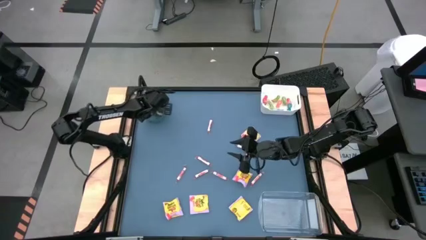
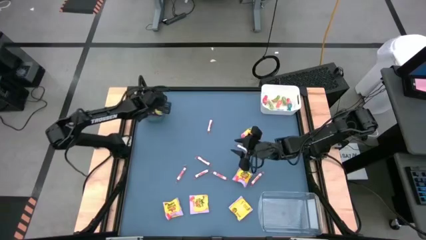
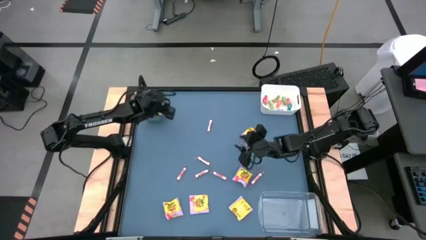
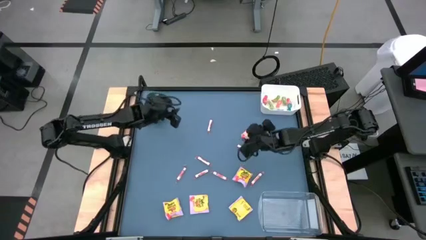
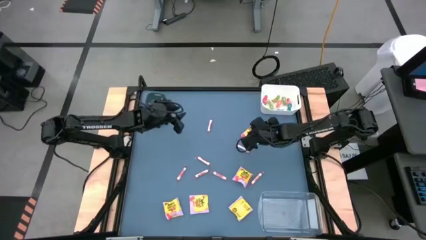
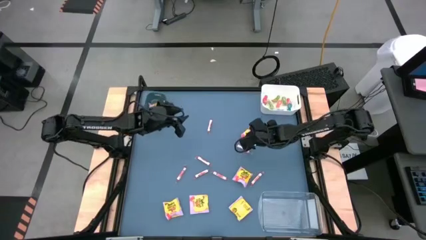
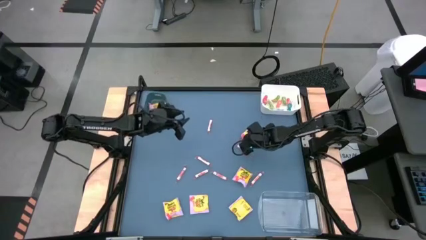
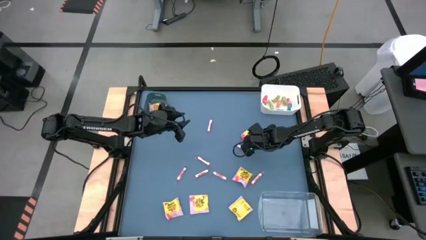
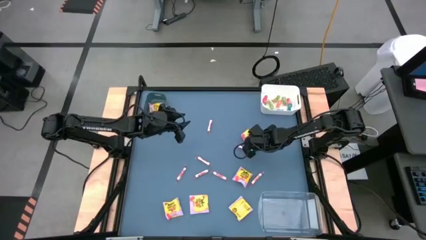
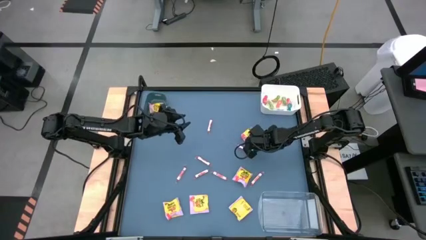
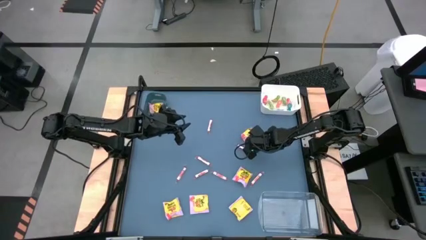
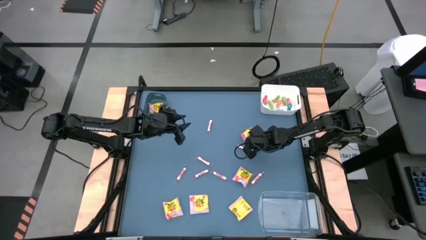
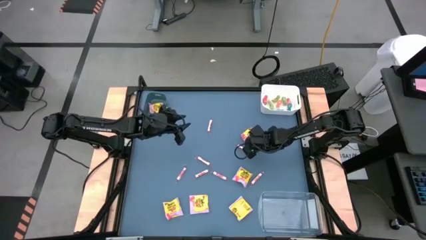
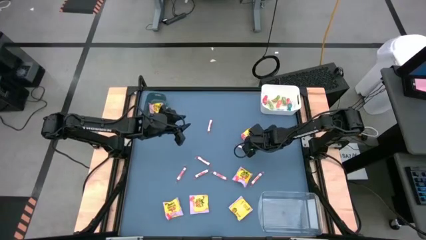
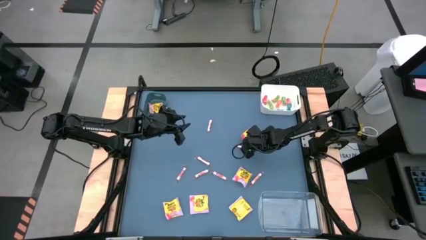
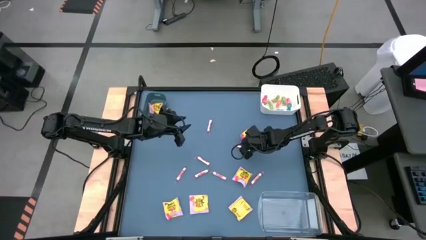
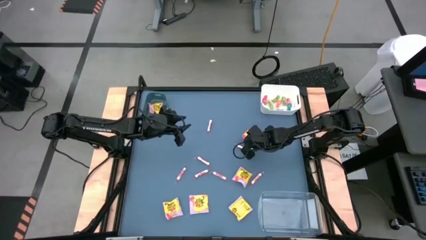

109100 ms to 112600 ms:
Task: Sort candy
Put the yellow candy pack into the blue bin

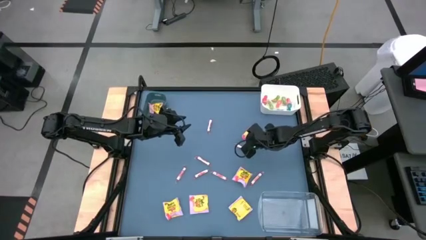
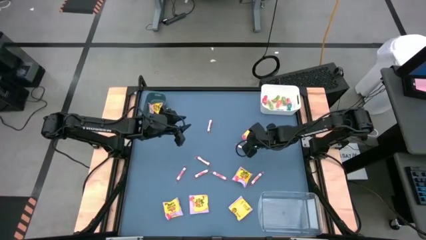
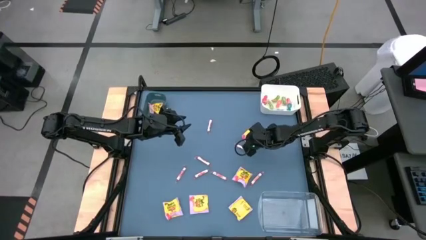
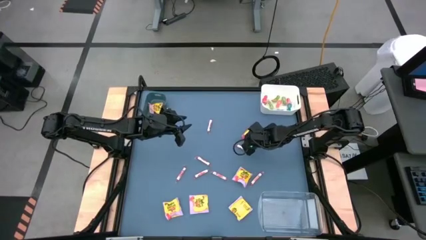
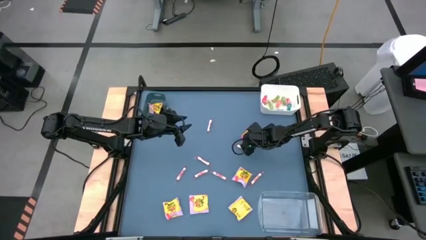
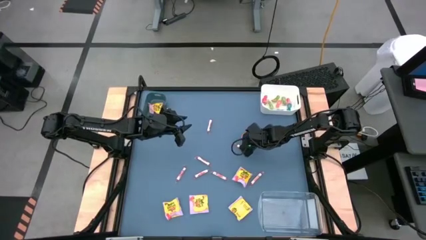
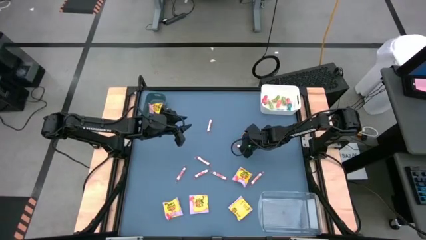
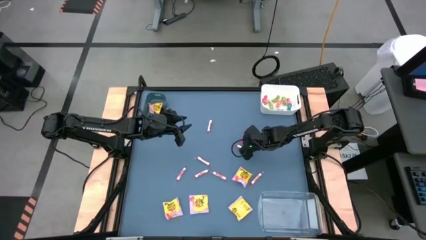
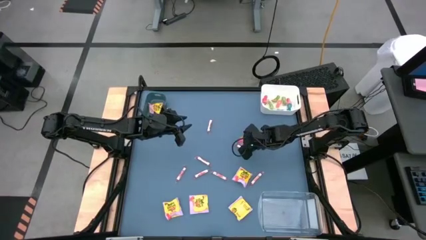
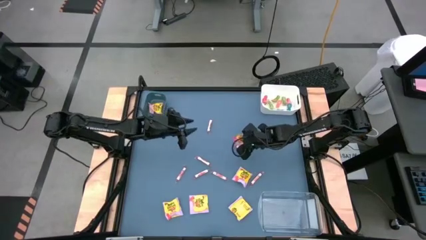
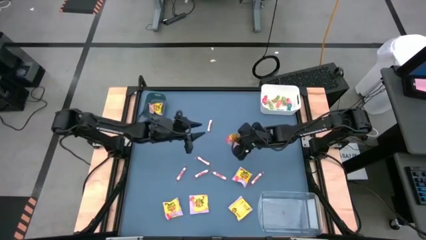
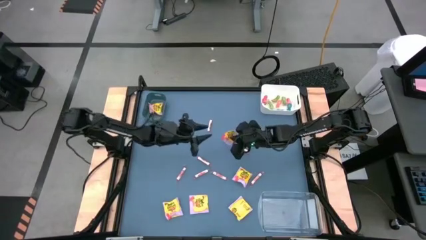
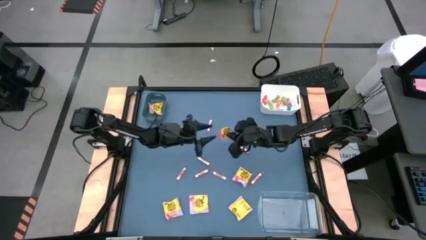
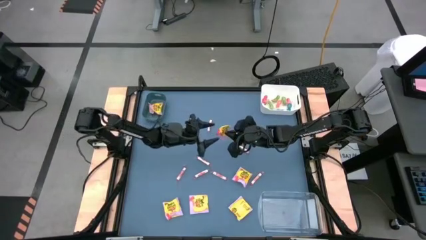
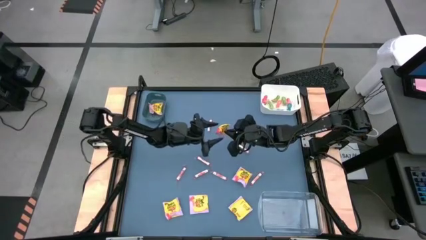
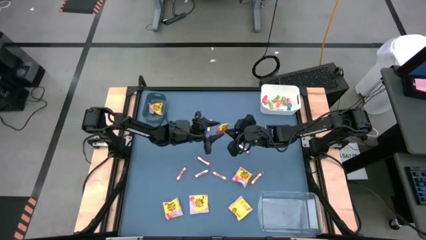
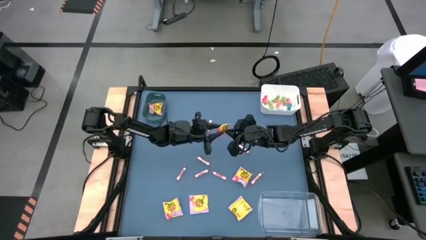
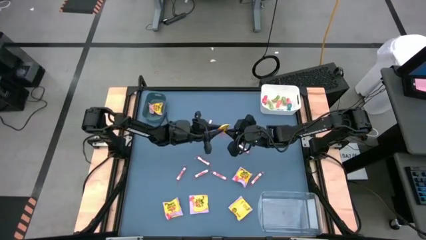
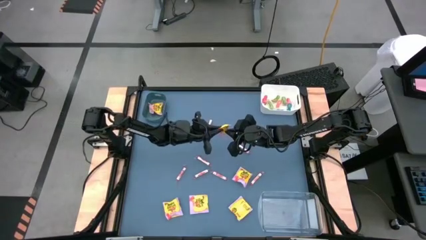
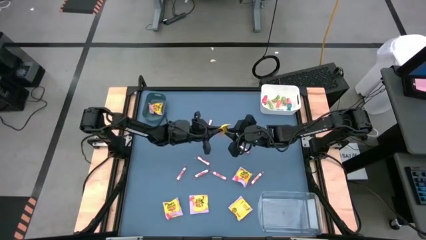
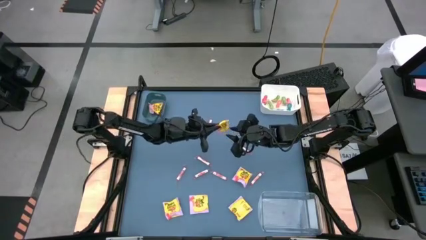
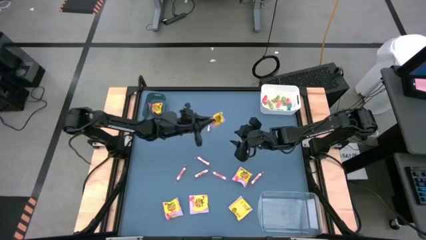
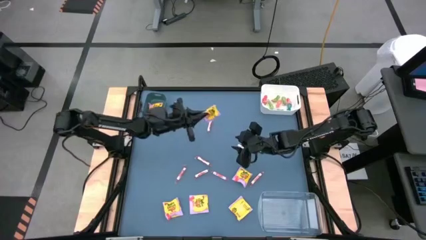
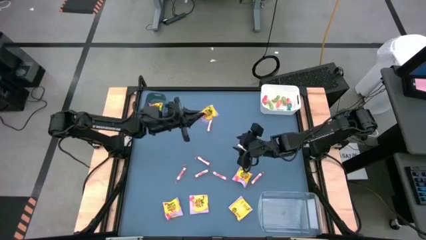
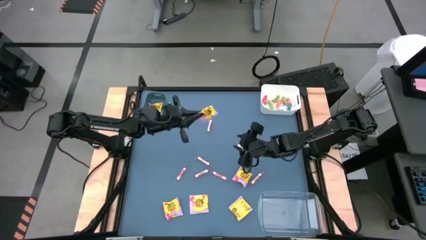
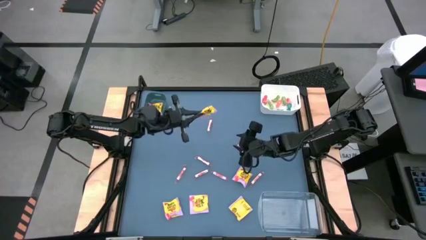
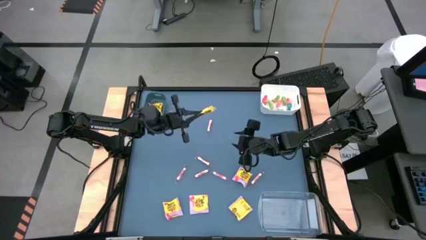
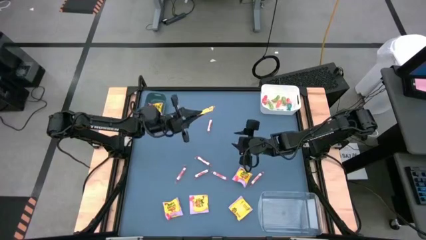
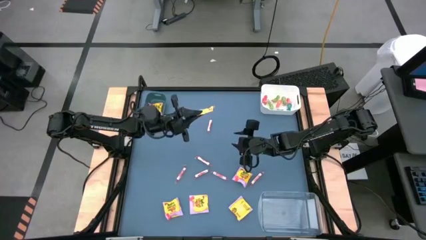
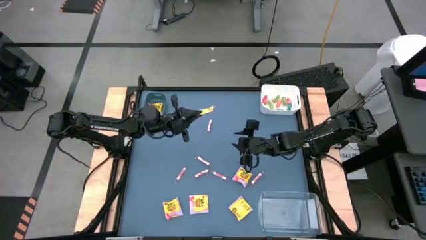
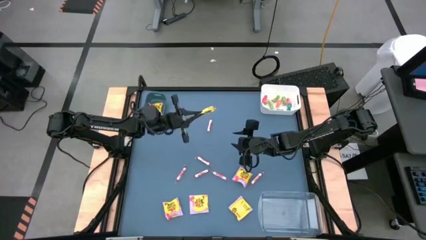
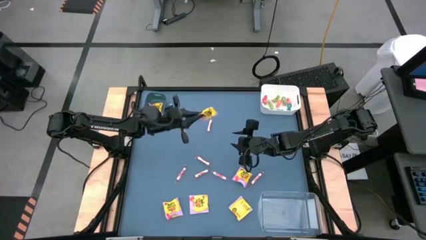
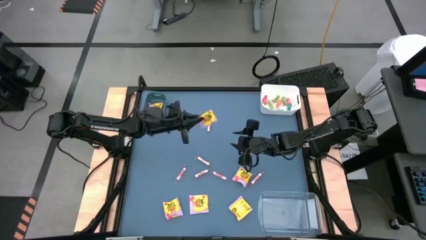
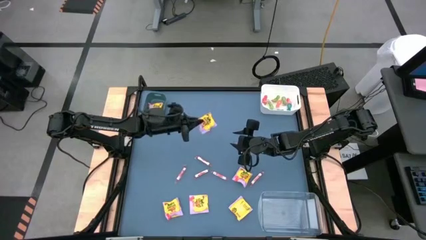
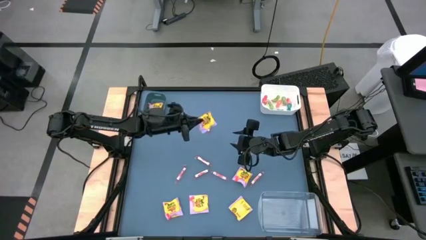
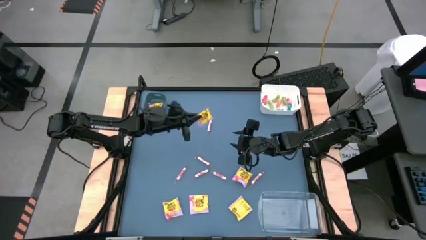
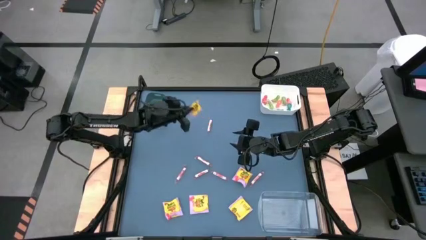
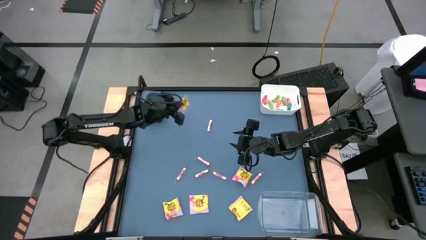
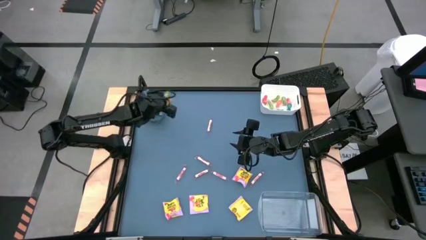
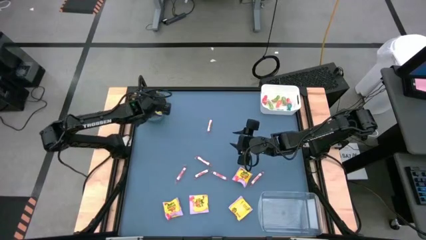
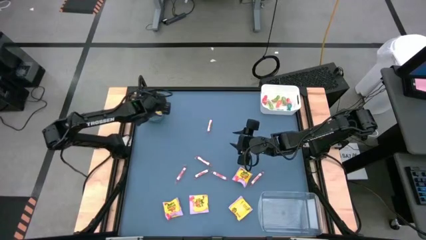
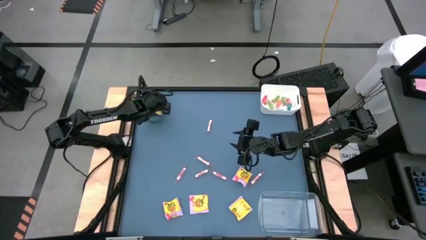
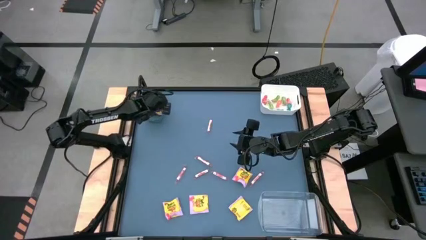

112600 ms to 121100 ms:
Put the yellow candy pack into the blue bin
